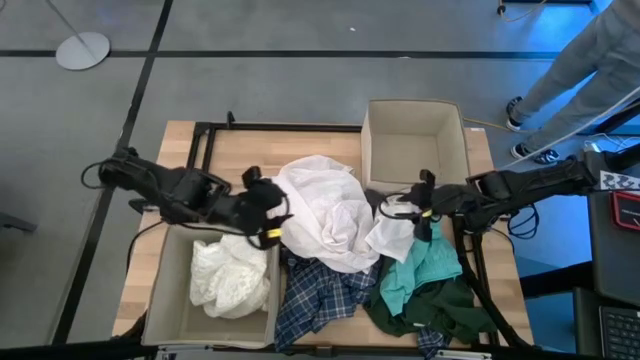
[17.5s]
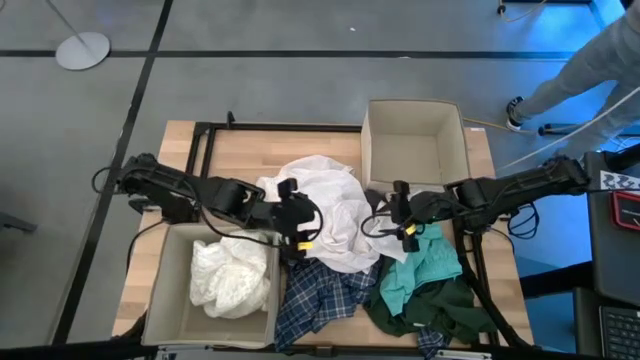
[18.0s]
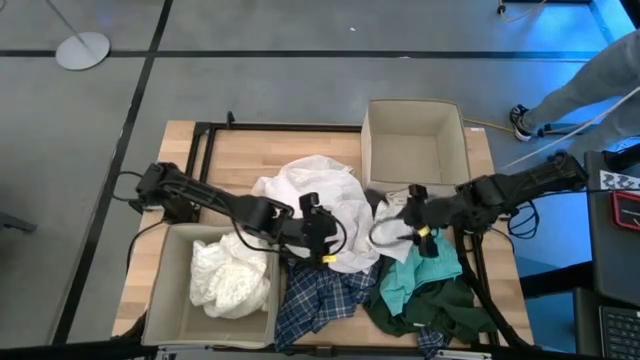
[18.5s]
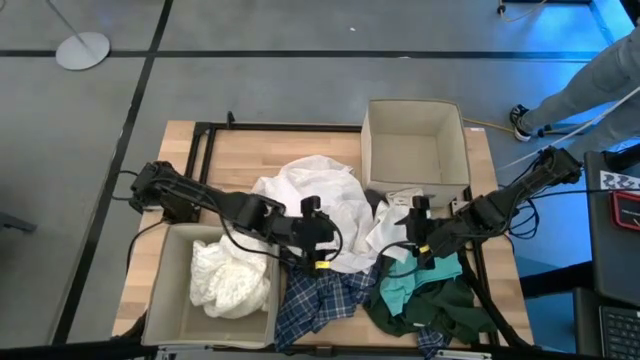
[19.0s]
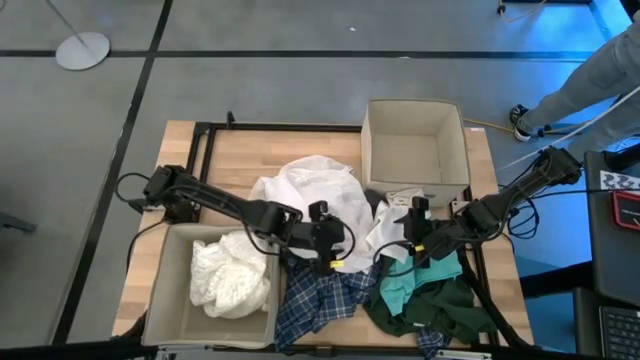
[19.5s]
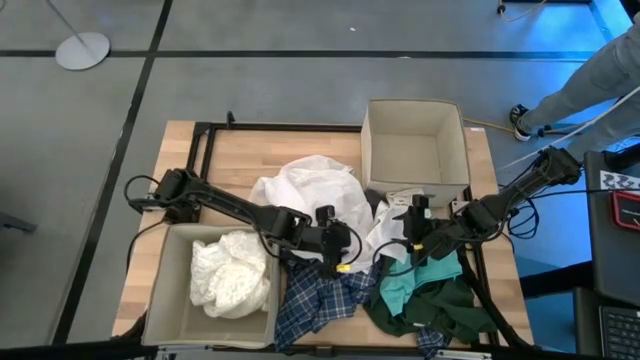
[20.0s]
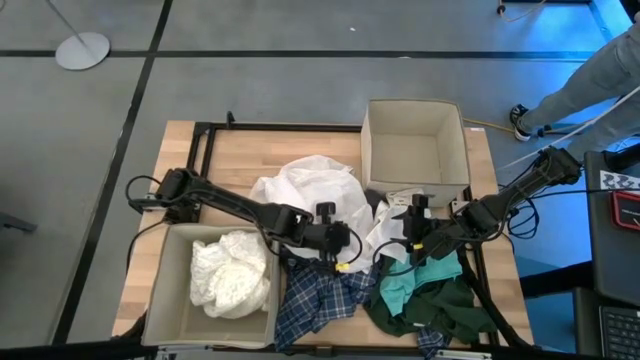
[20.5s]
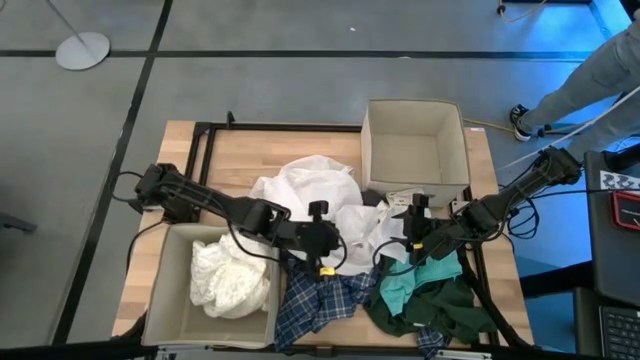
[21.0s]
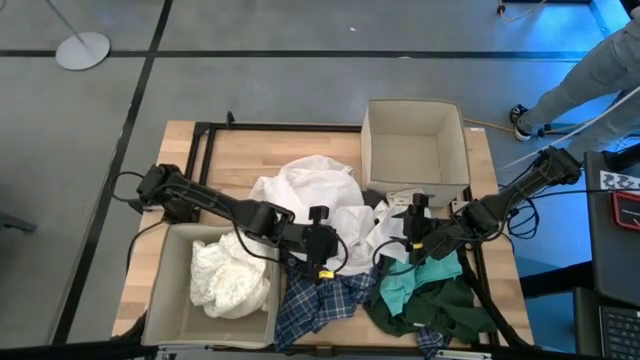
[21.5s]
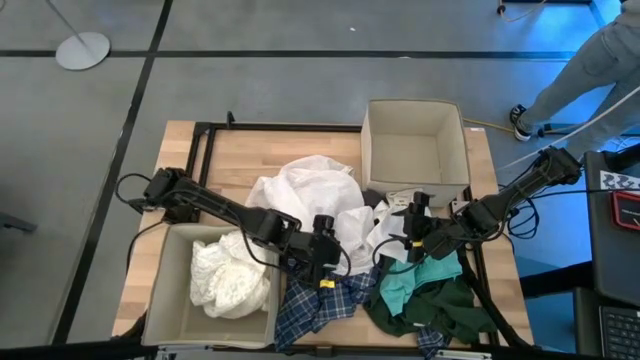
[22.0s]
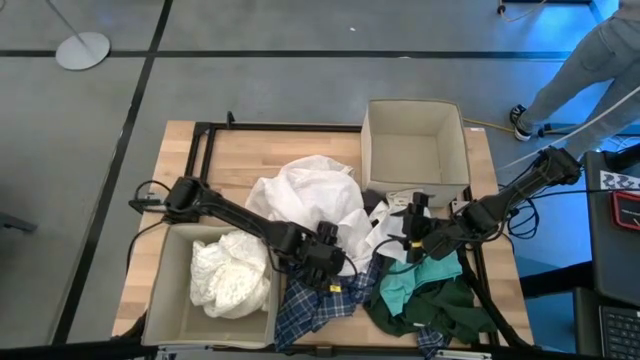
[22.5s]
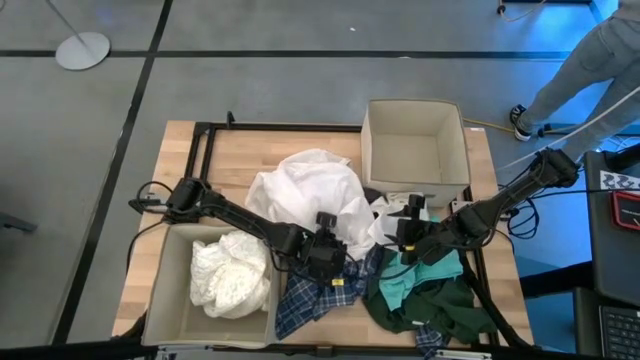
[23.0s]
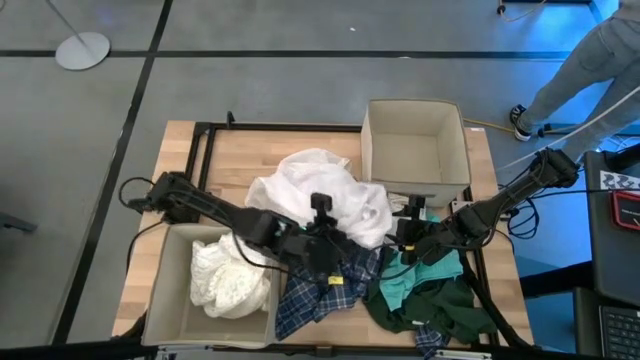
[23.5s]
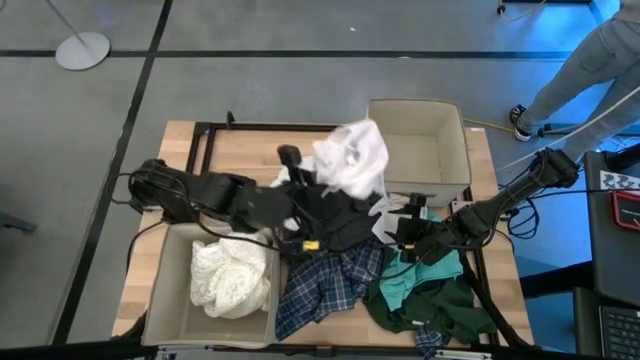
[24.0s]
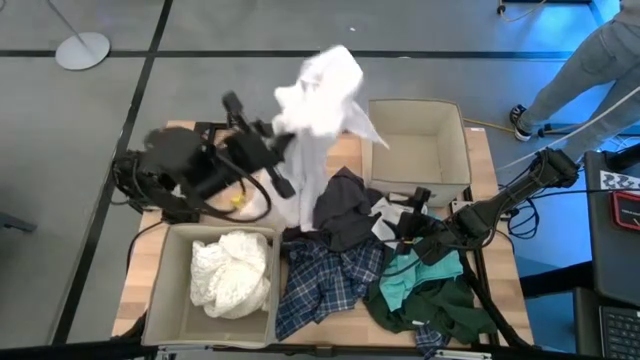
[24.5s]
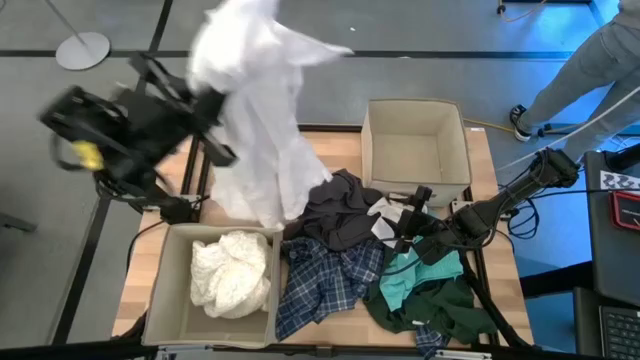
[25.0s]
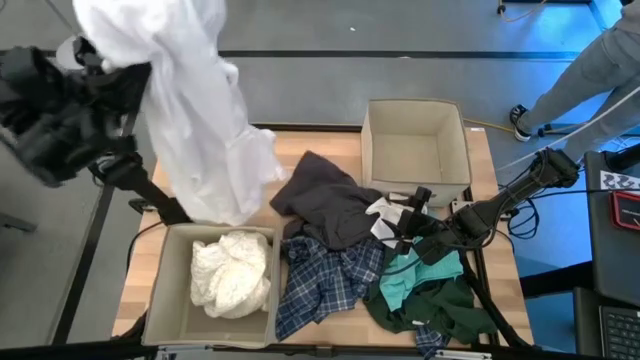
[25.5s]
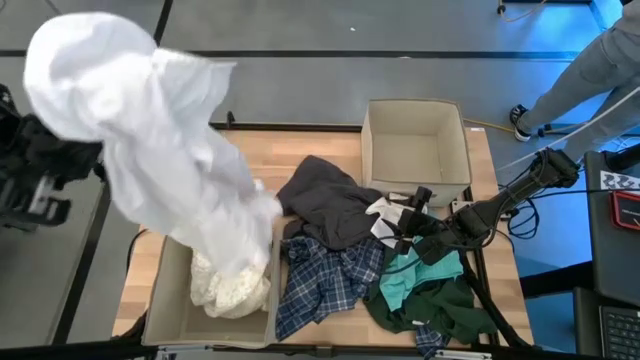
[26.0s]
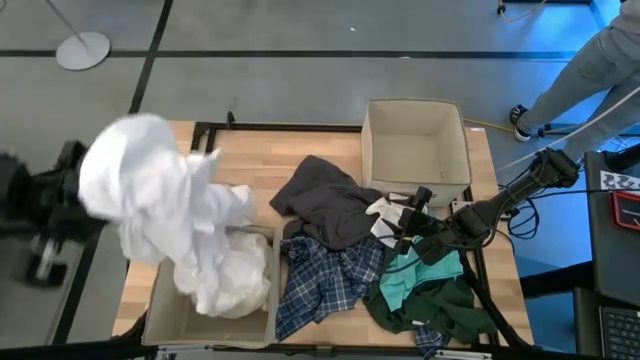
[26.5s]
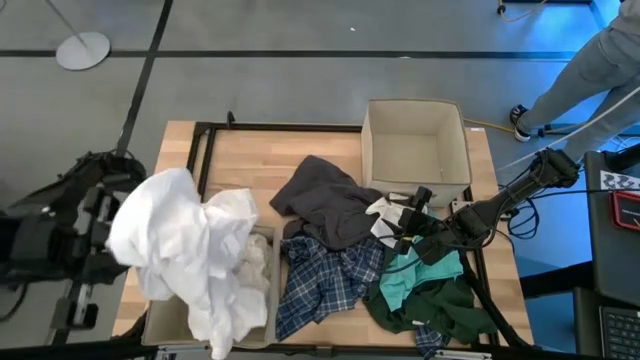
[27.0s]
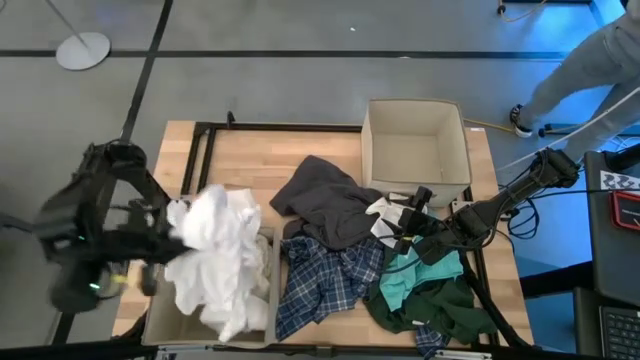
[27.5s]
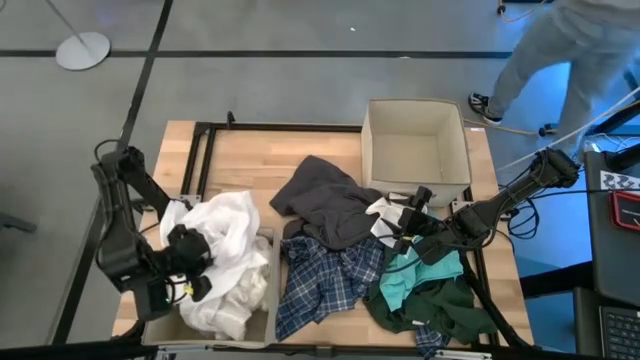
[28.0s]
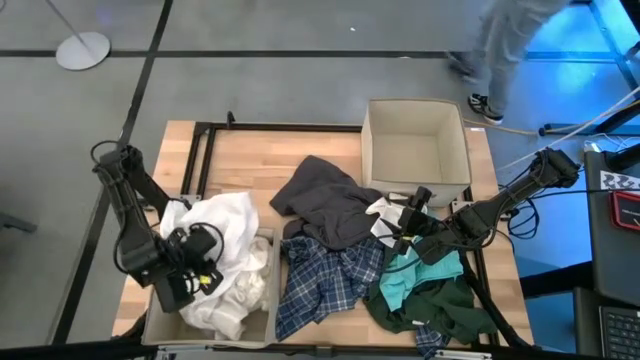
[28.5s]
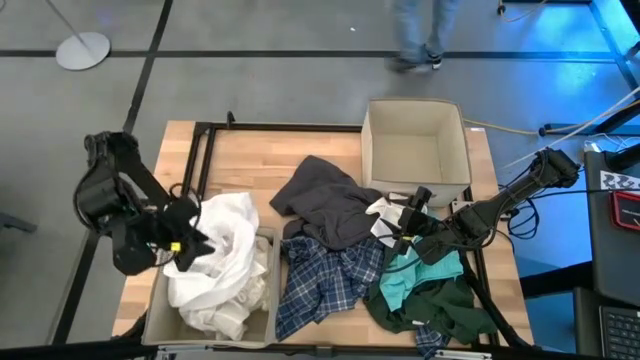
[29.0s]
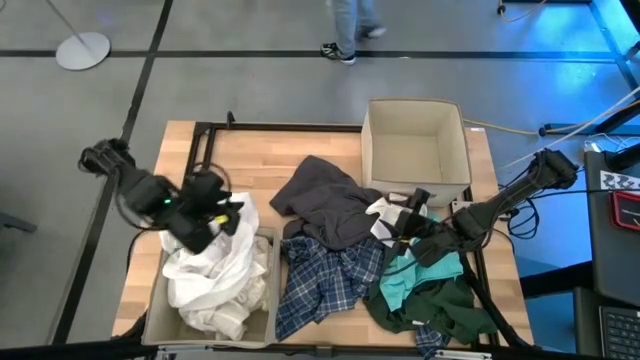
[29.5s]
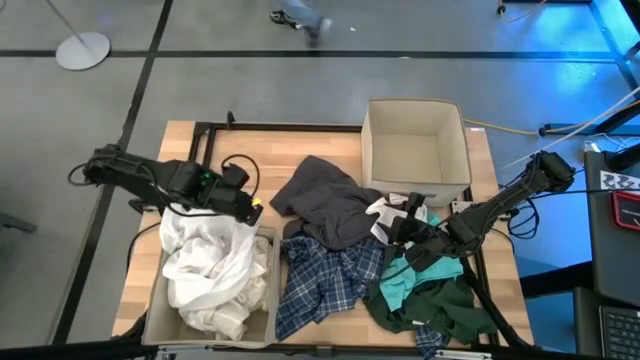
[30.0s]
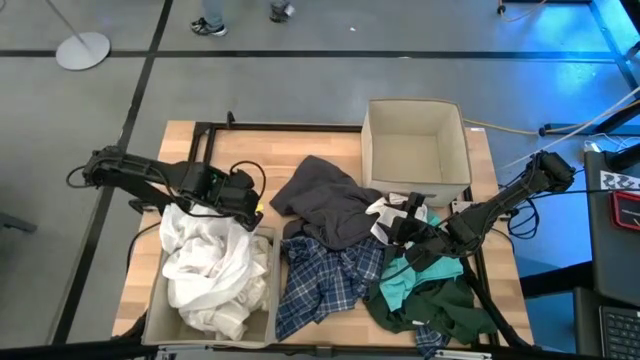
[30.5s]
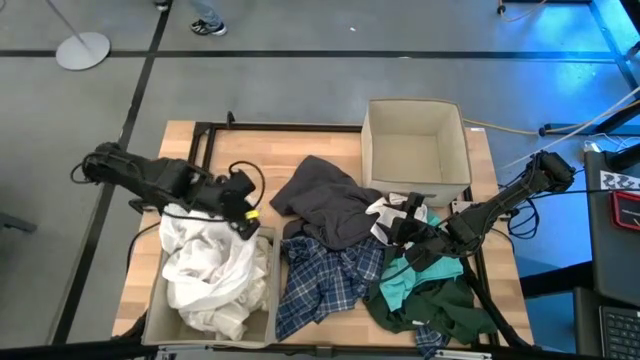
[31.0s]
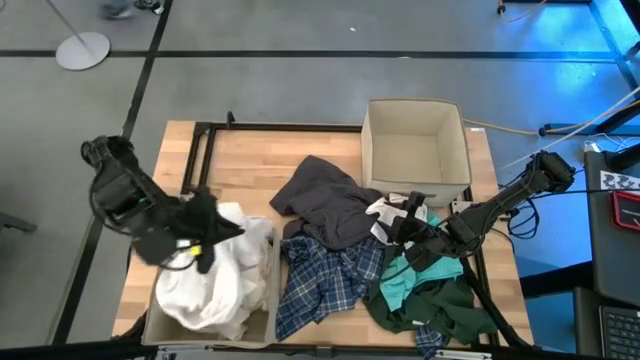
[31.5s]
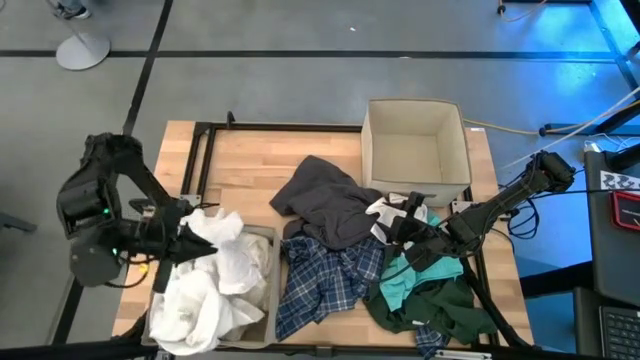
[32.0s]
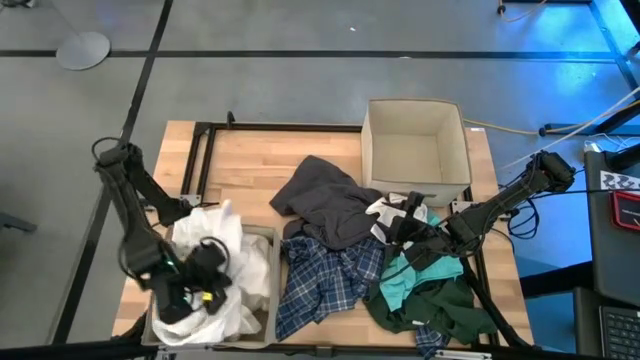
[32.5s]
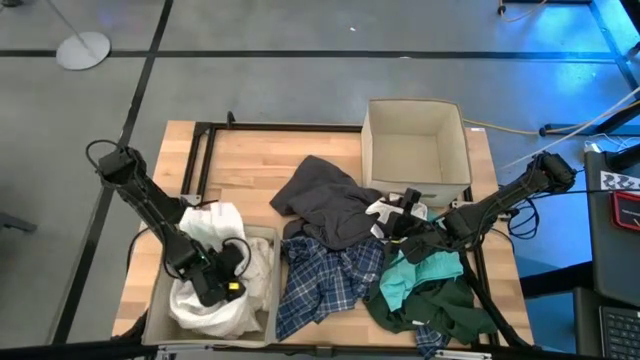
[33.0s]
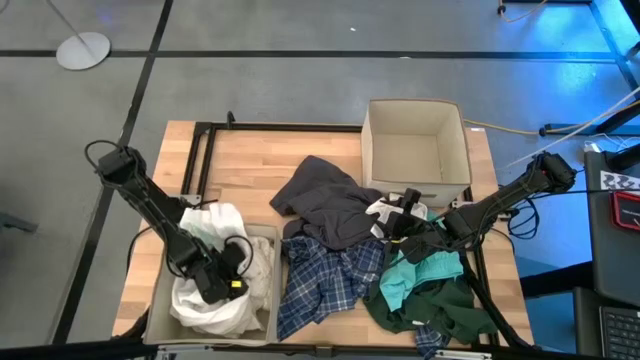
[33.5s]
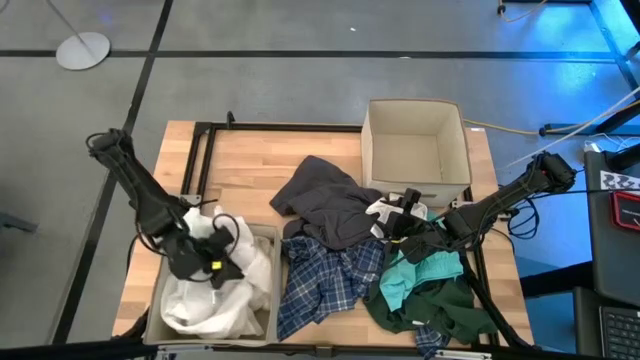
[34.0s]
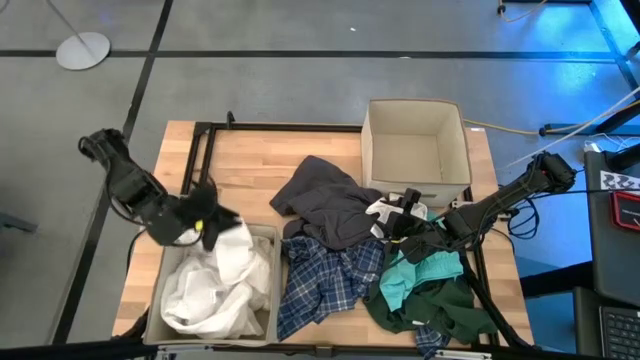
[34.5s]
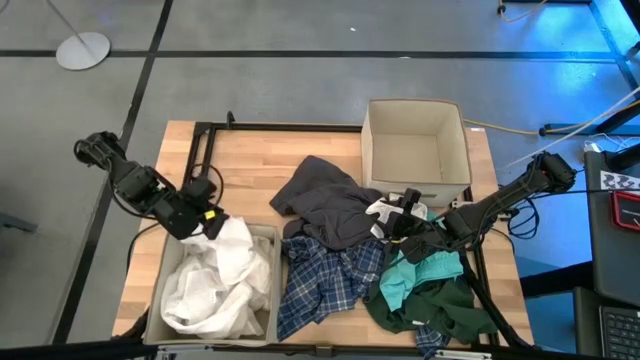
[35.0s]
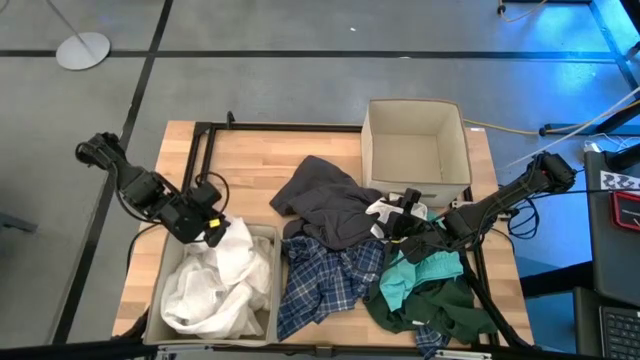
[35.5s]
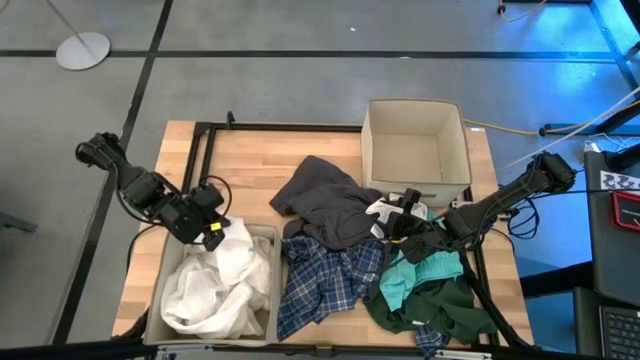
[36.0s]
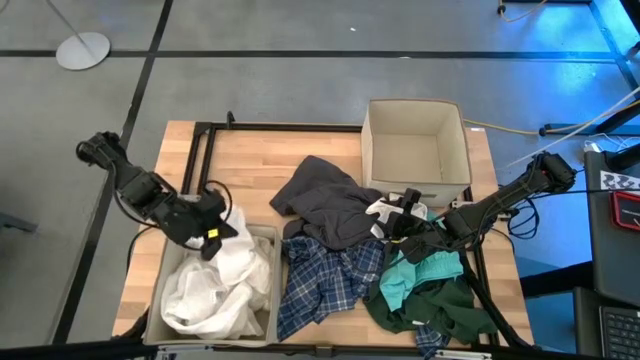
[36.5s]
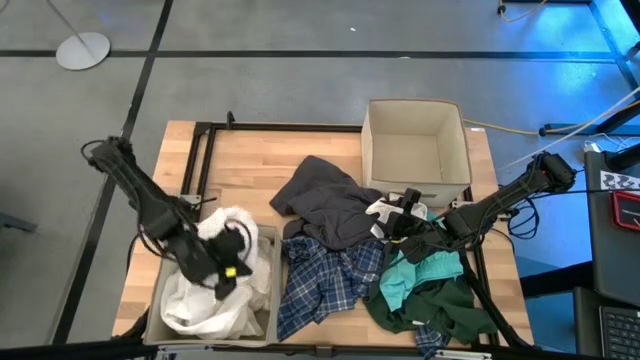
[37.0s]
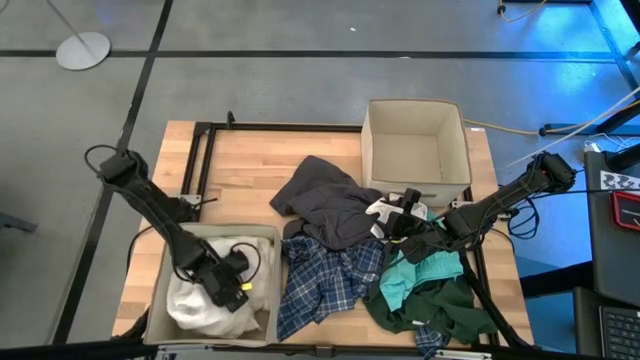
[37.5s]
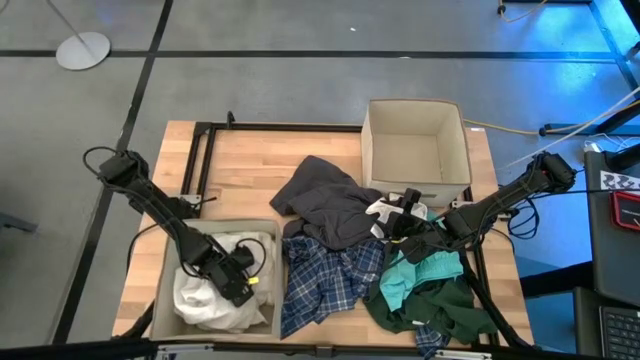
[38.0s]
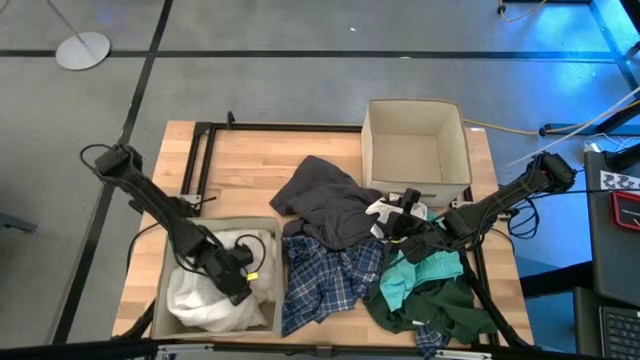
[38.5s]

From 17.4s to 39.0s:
Task: Sort clothes
Put the white shirt into the bottom left brown laundry bin
